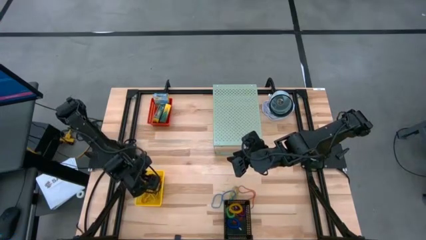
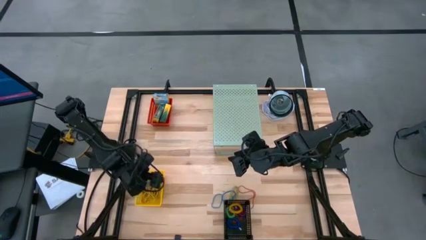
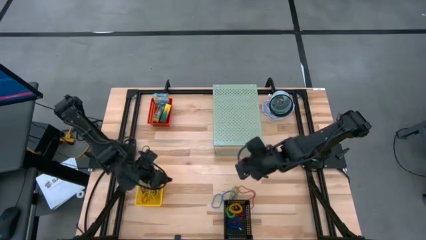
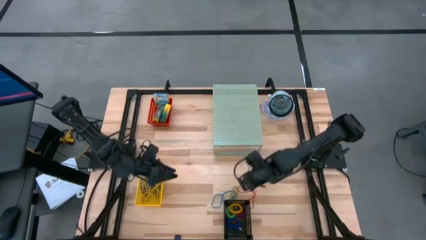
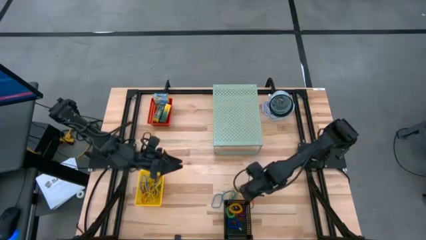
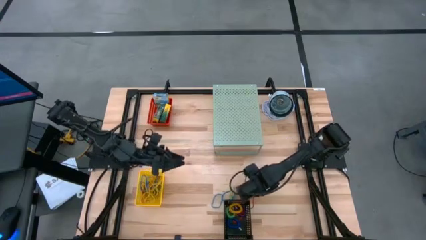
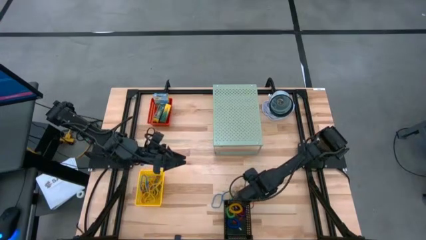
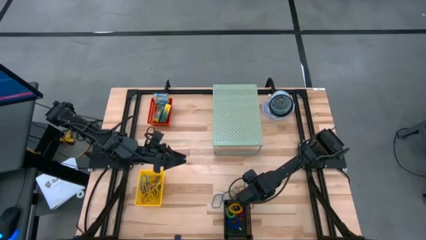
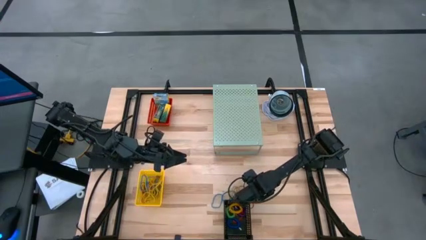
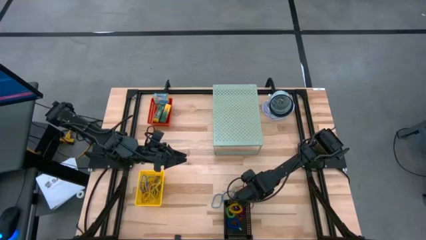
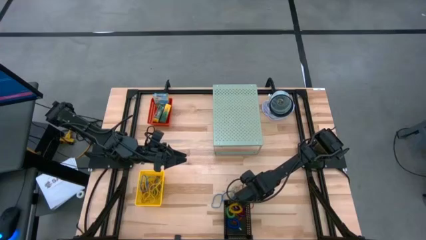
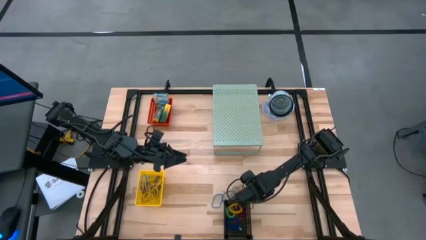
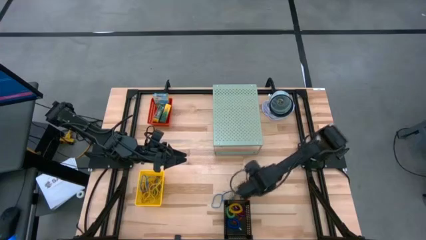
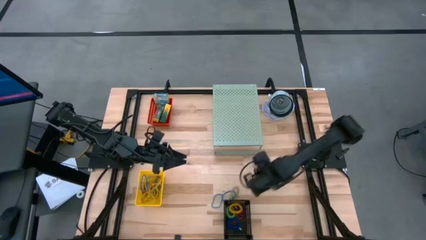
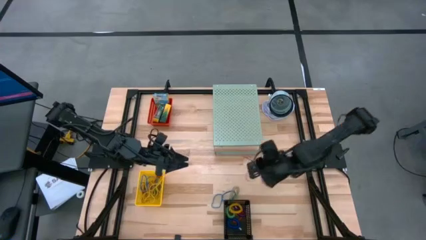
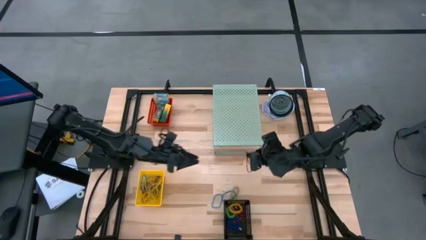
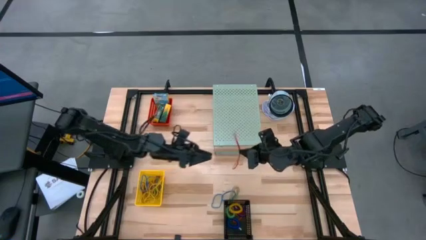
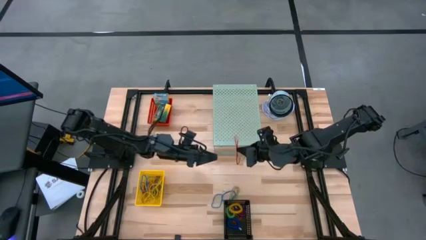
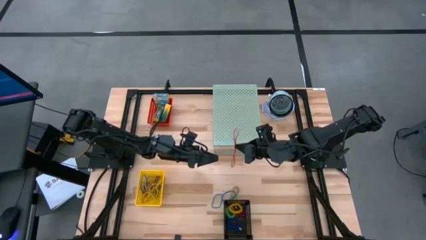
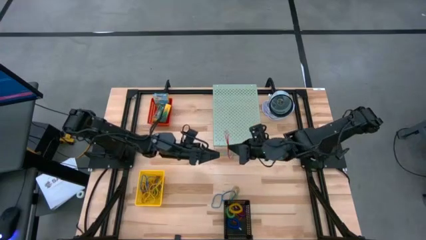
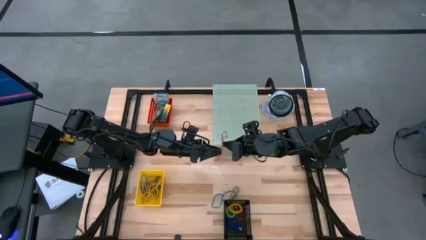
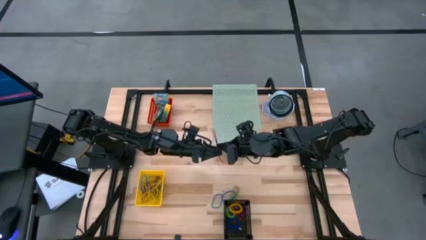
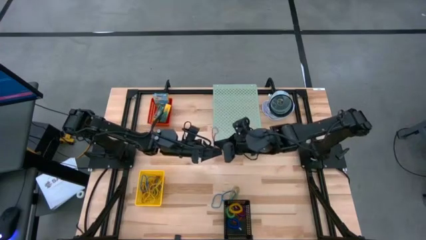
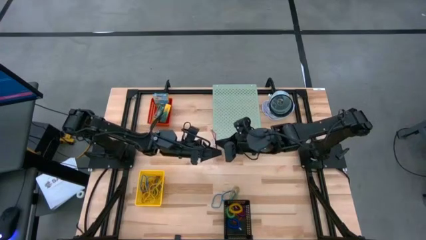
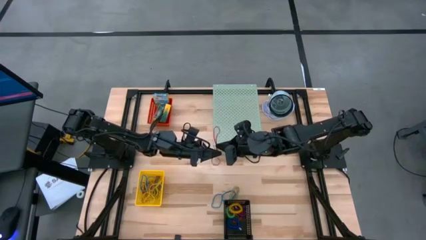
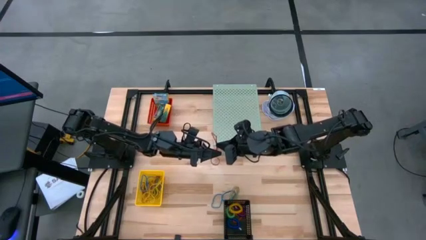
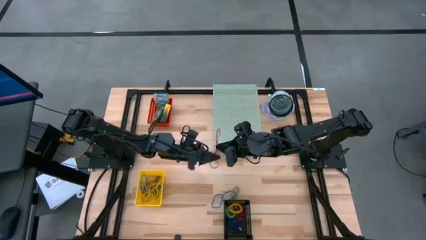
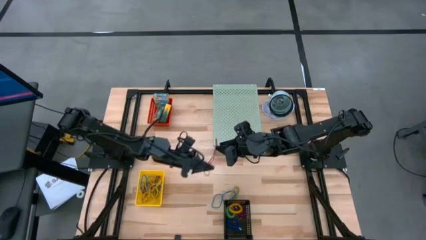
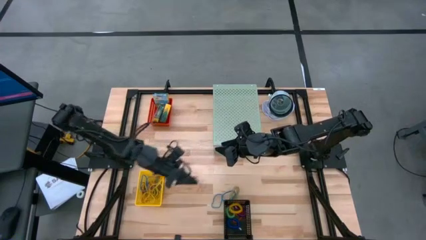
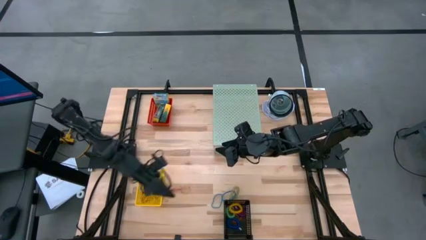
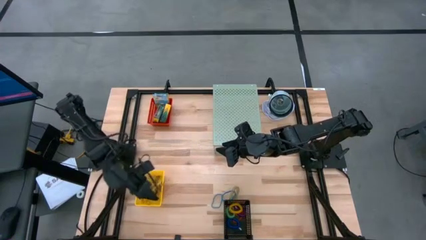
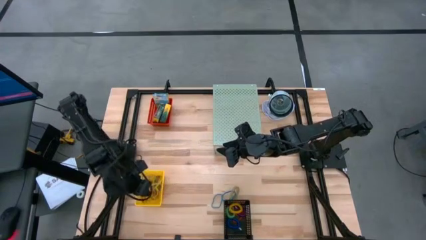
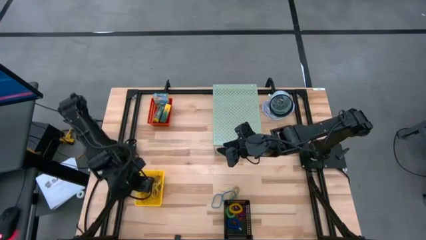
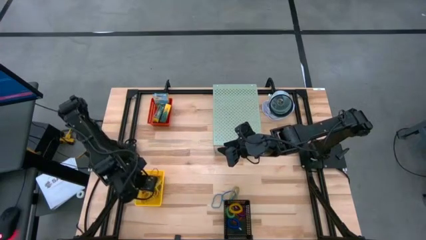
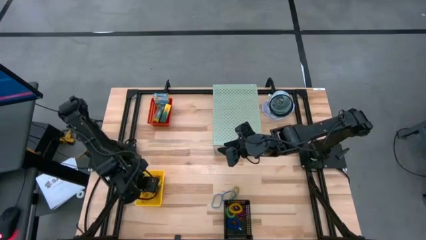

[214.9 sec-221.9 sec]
Task: Pick & Place Office Desk Supplies
Put the red rubber band into the yellow bin

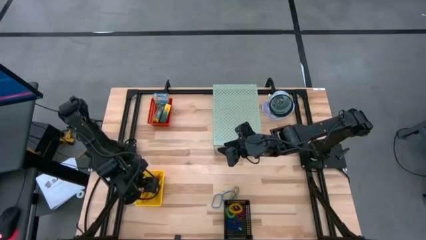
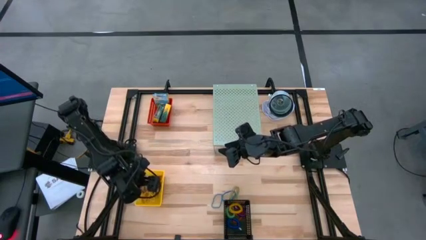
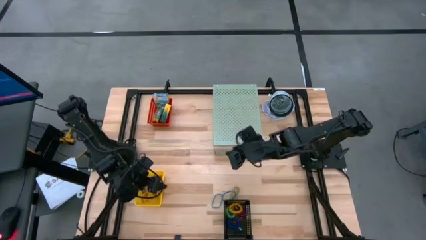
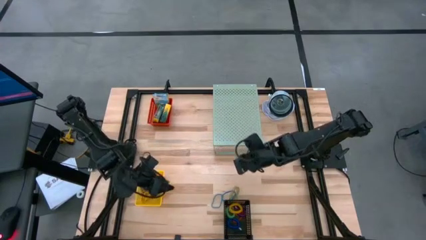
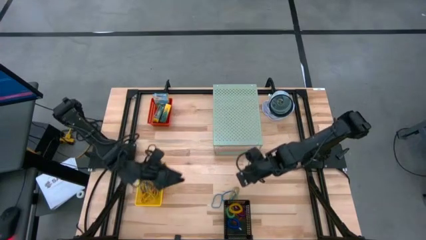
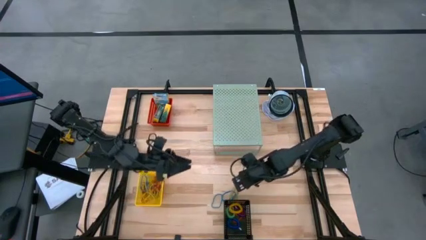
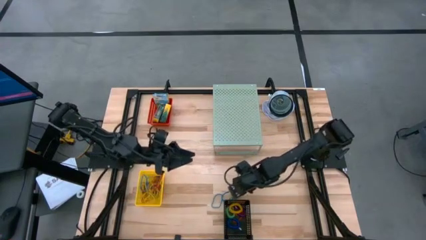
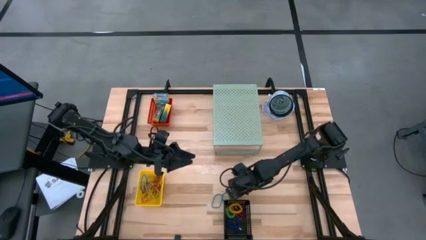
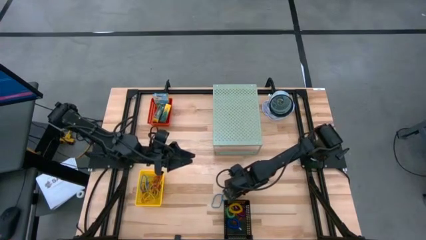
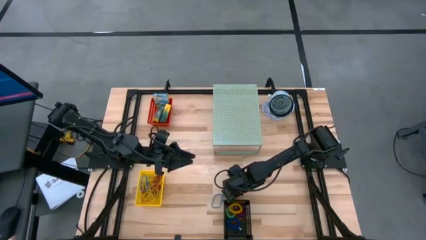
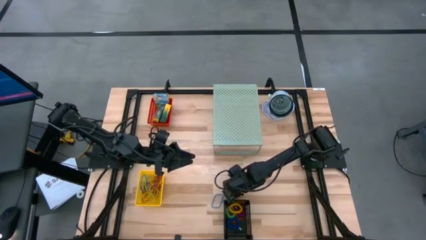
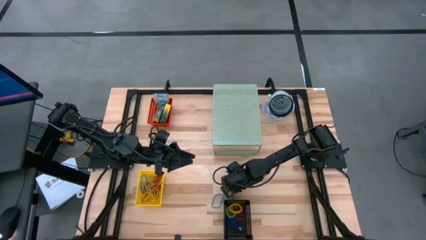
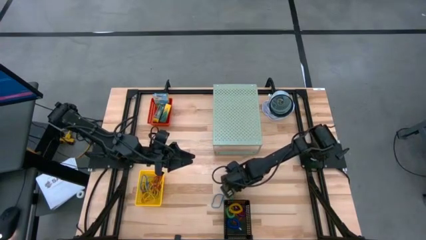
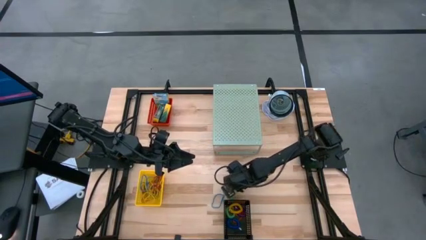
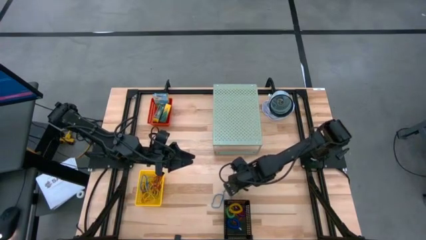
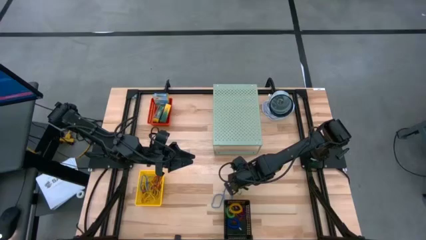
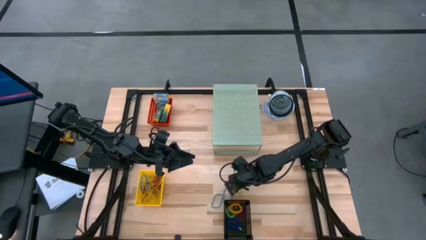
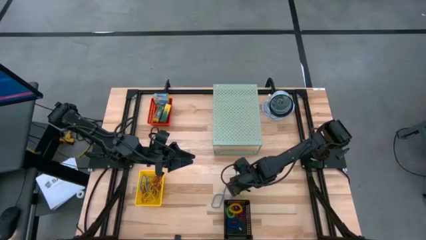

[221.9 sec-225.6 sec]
Put the orange rubber band into the yellow bin

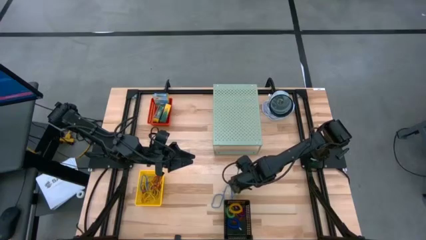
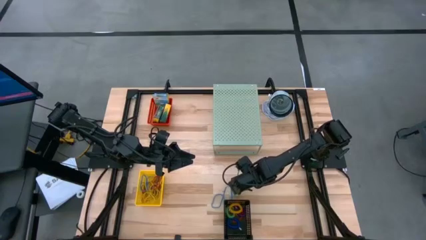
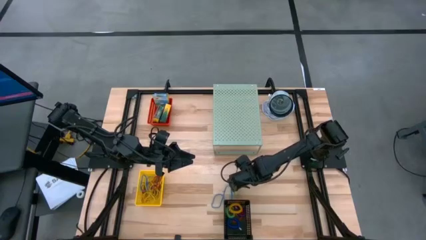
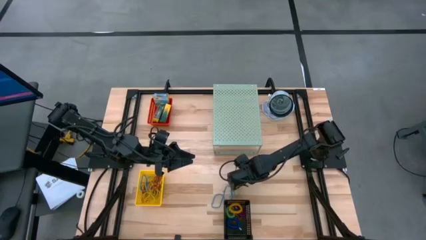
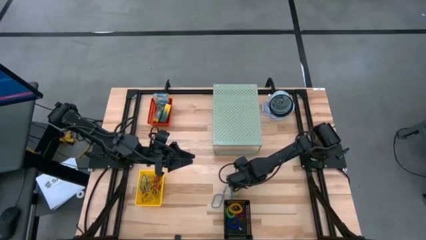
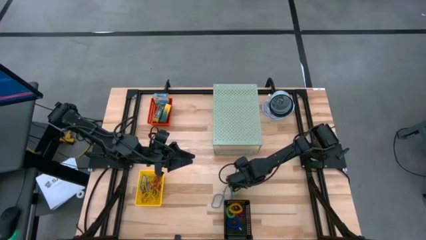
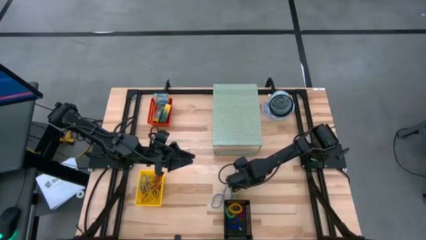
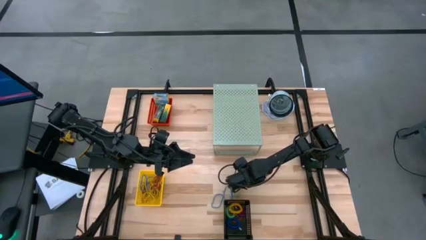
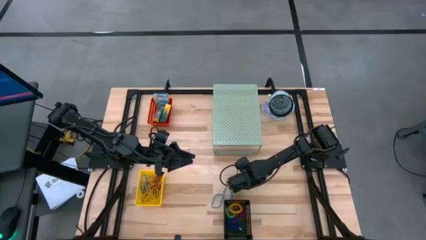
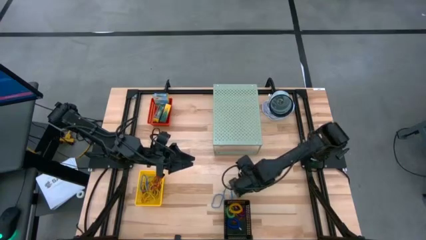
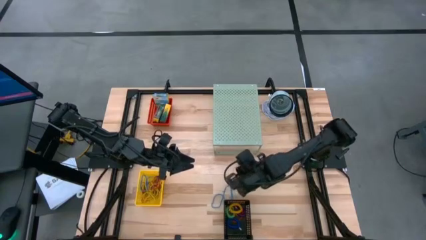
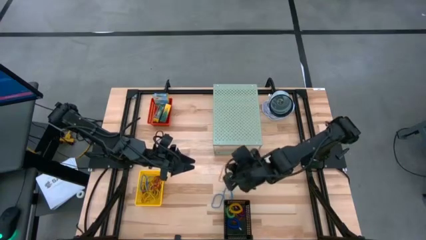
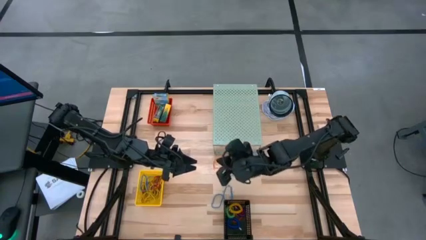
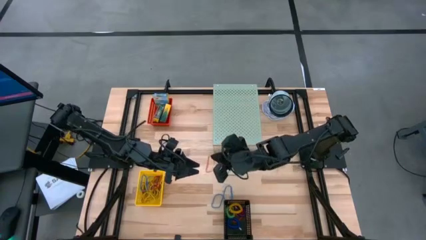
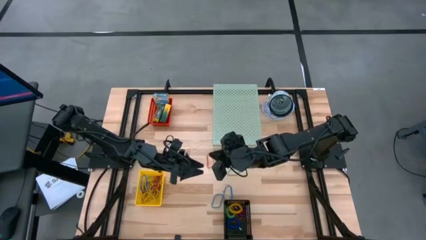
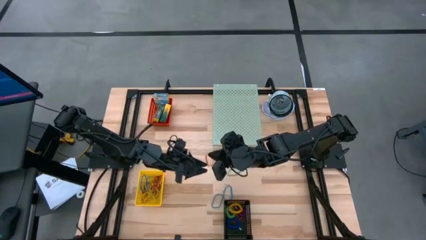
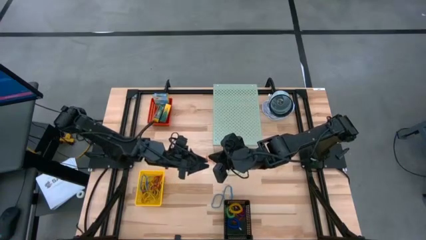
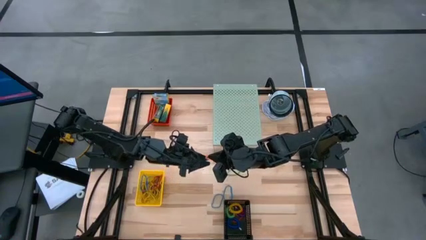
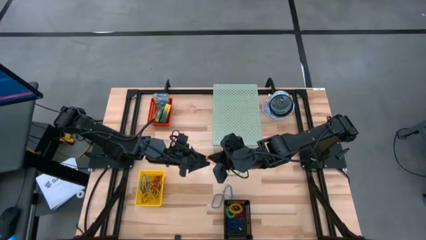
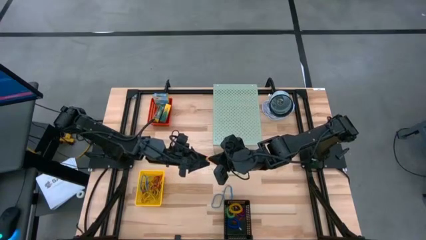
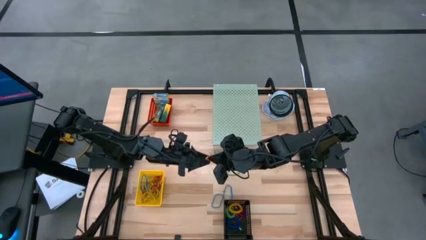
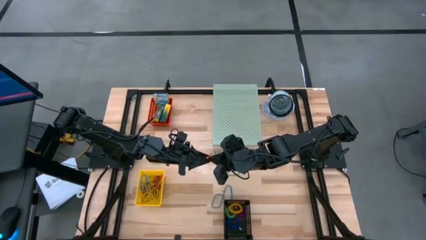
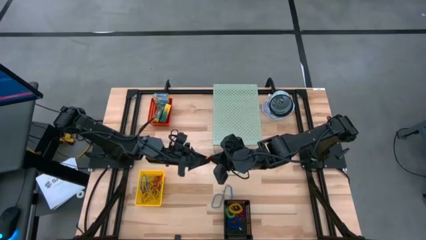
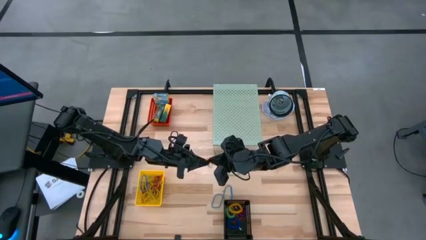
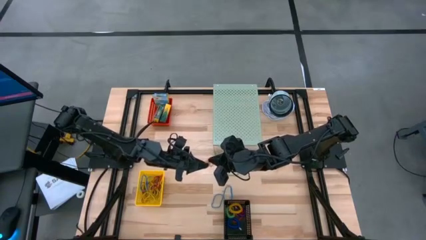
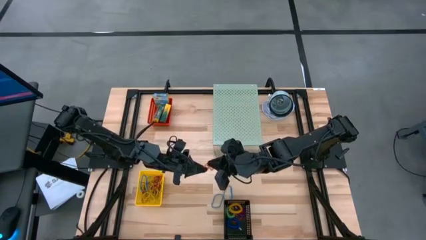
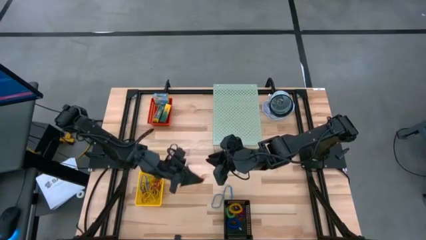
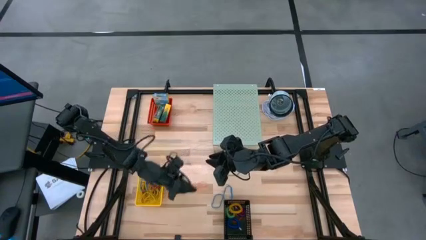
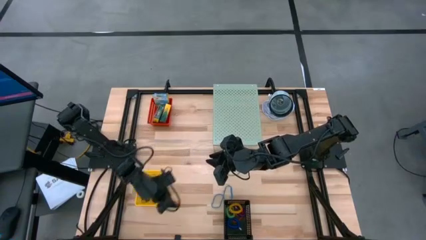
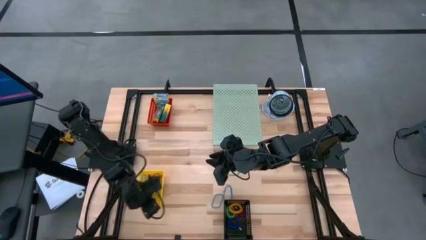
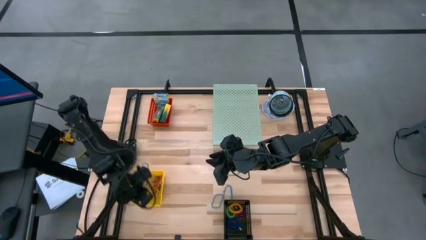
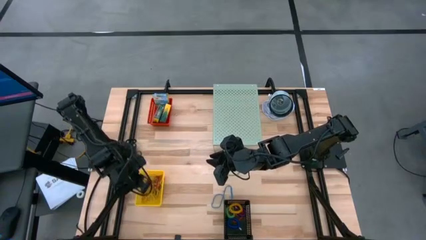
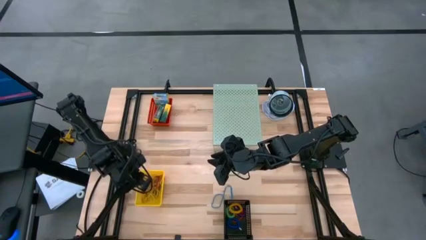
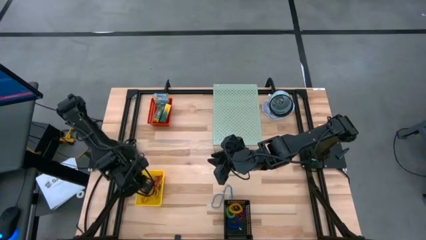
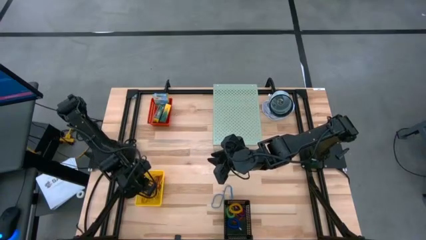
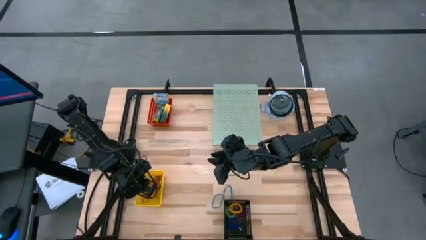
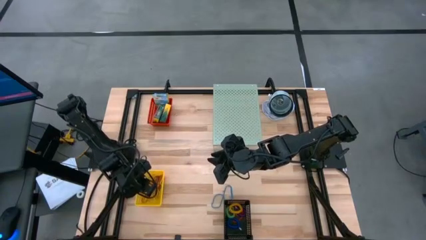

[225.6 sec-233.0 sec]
Put the orange rubber band into the yellow bin
